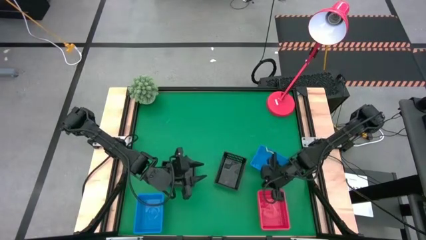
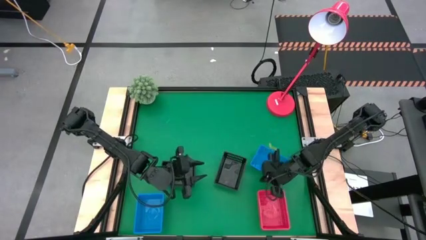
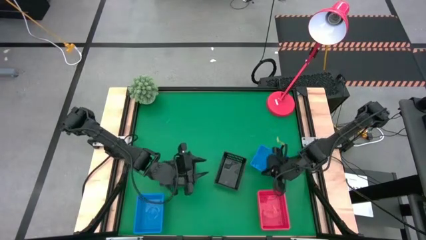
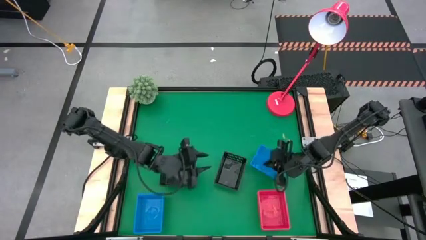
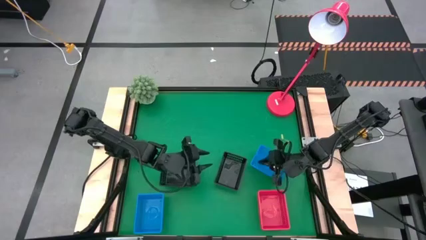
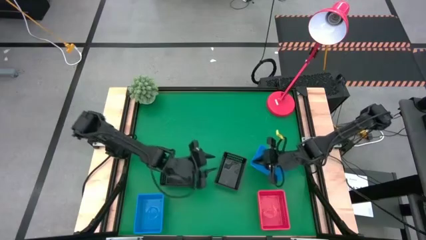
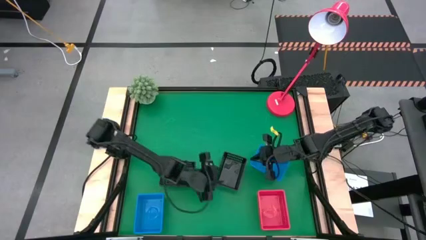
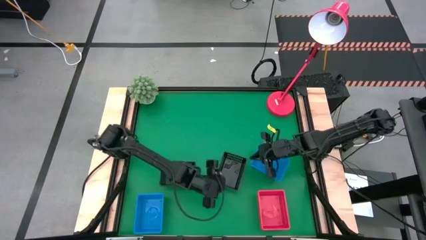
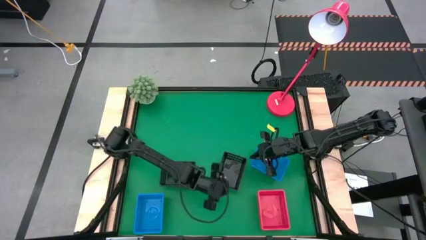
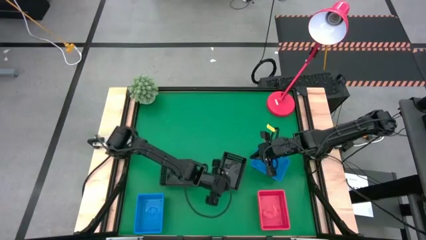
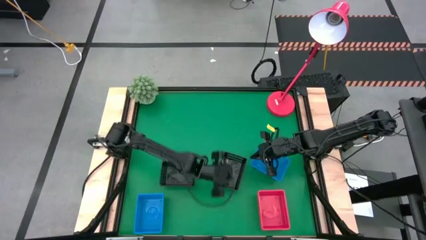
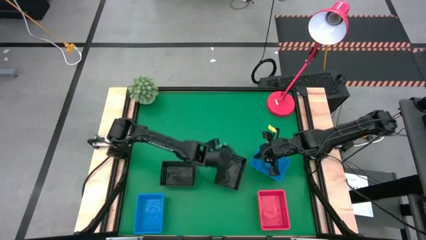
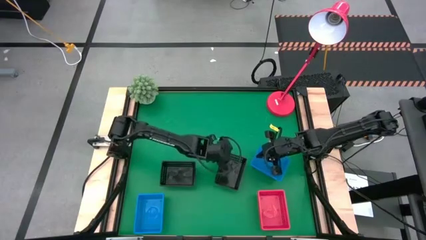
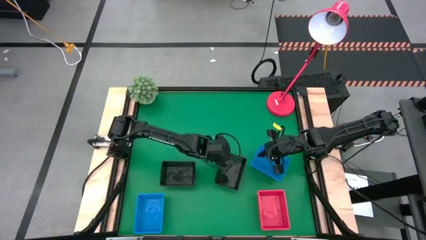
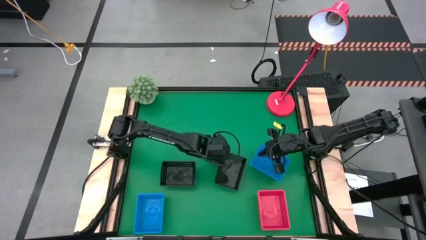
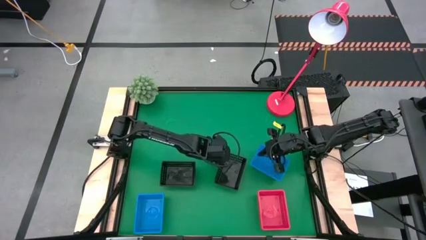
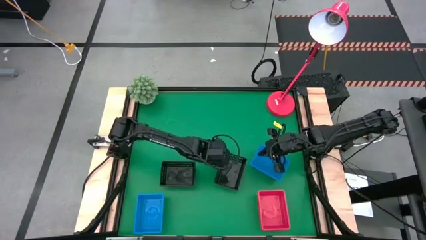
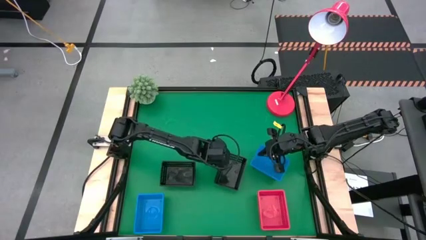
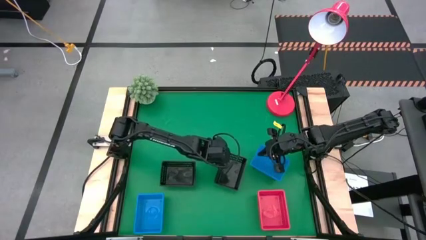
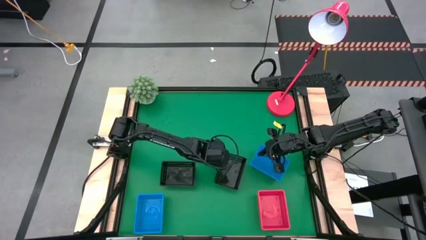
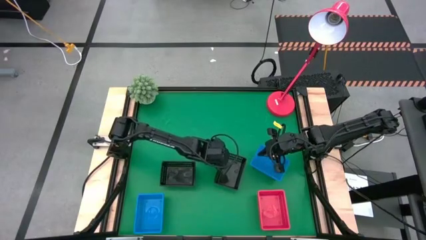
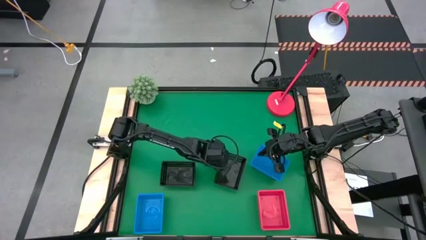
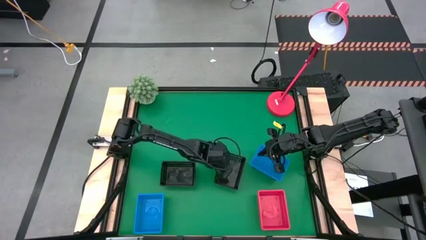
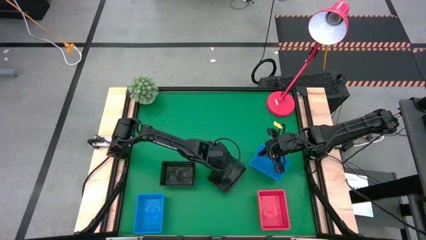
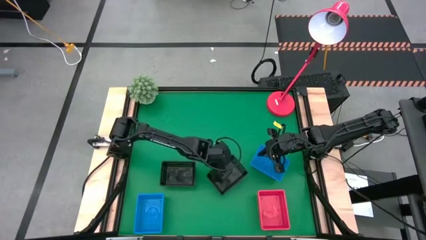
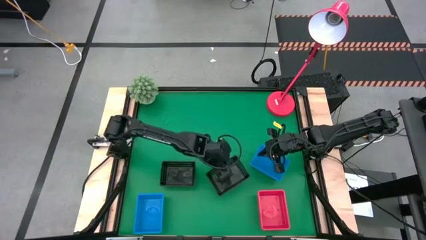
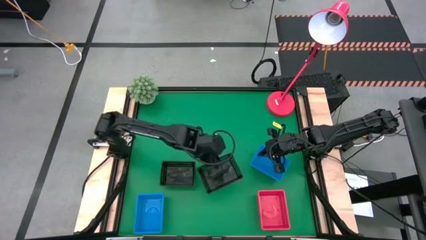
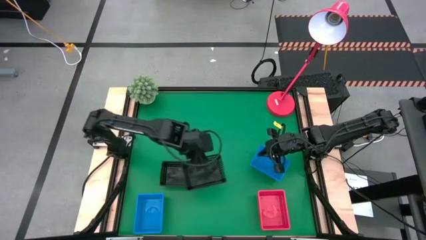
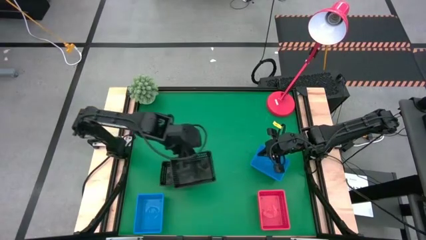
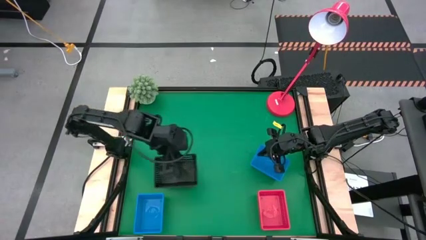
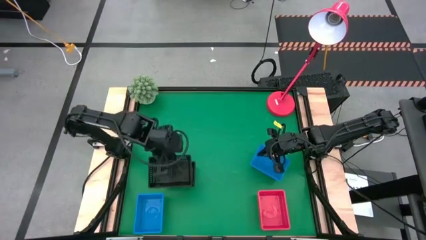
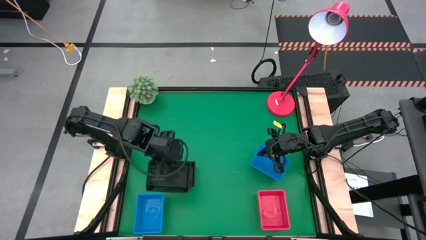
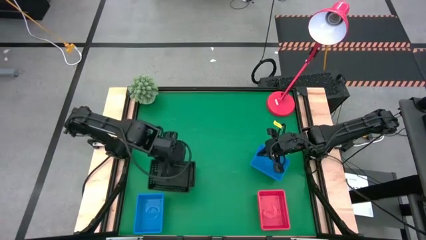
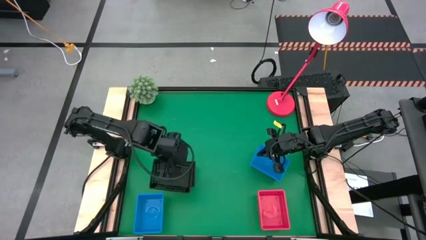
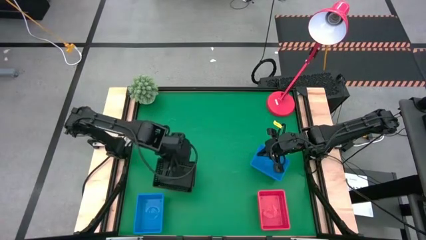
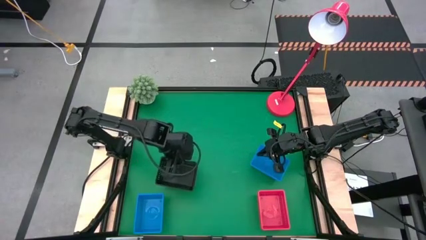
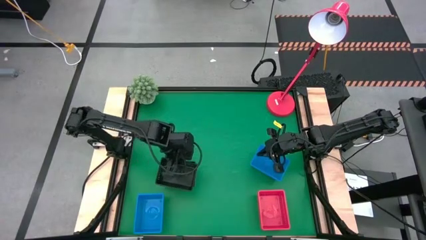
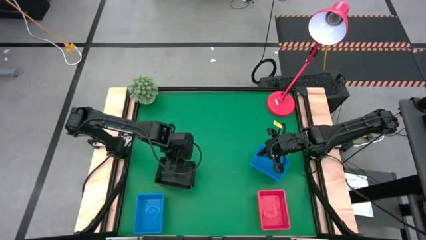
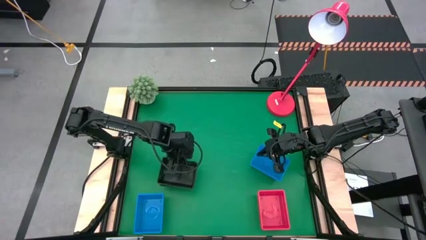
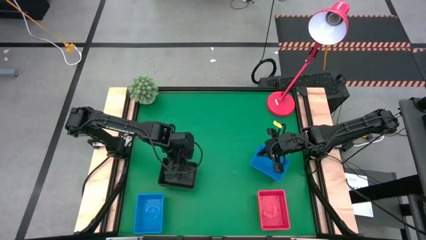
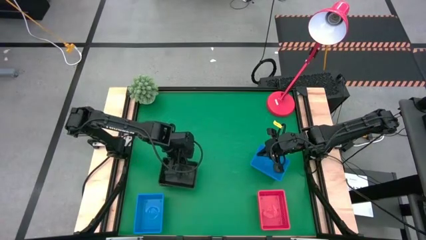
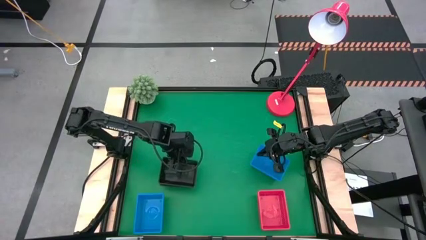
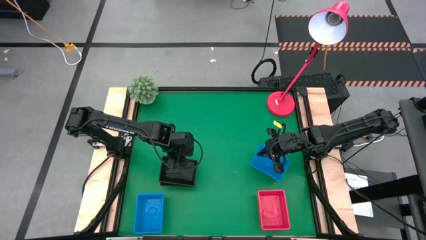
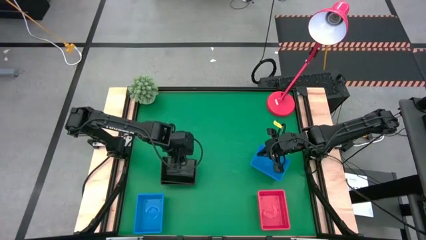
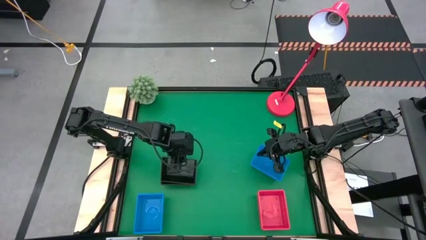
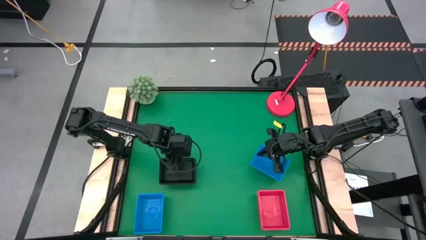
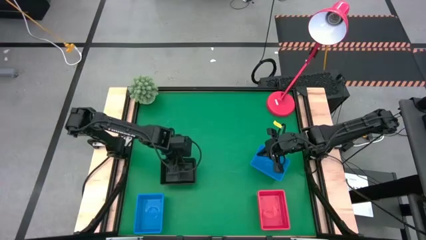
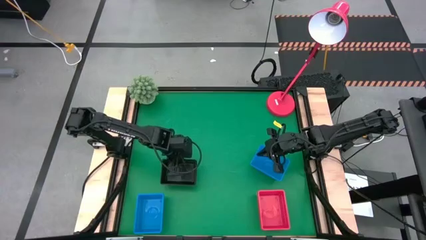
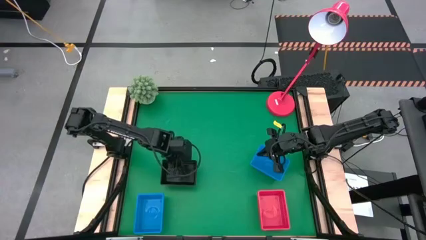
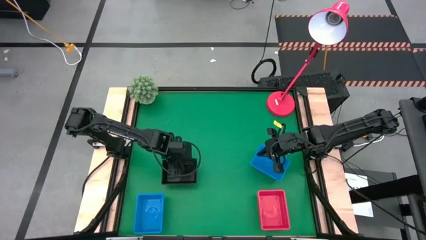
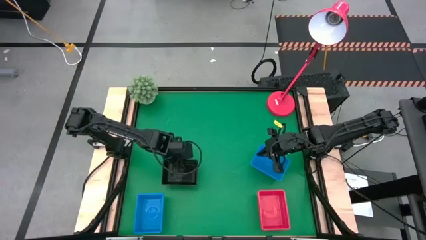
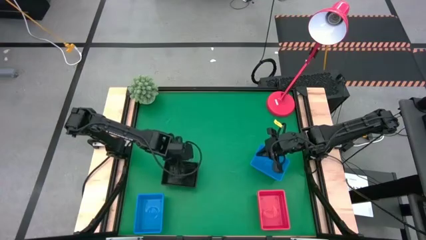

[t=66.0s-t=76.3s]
Stack the right black bin on the left stacked black bins

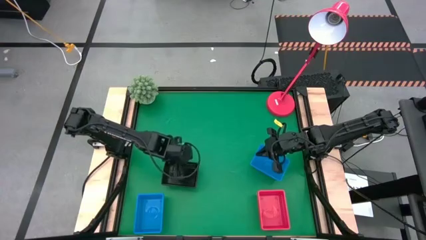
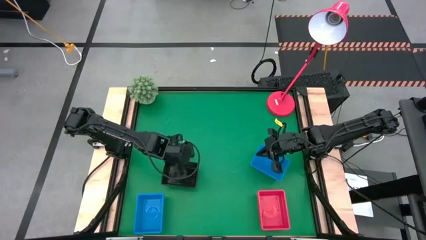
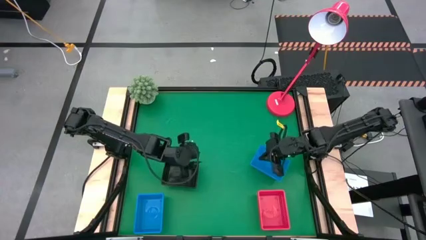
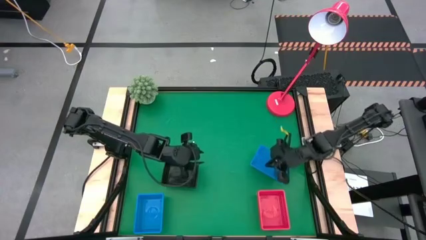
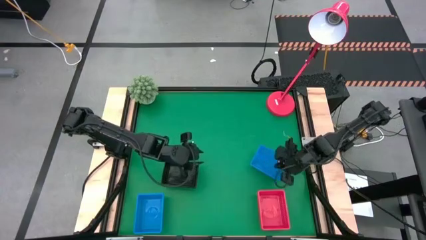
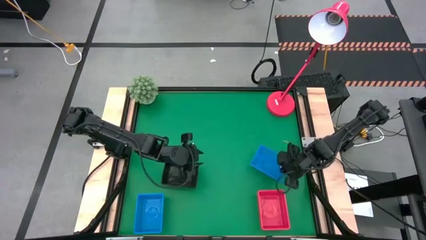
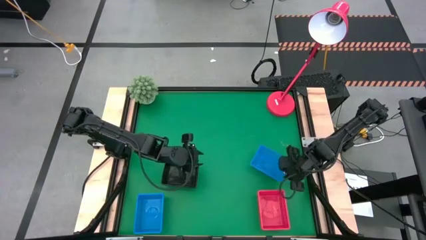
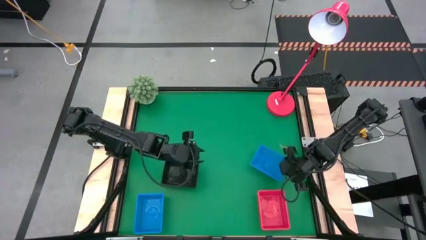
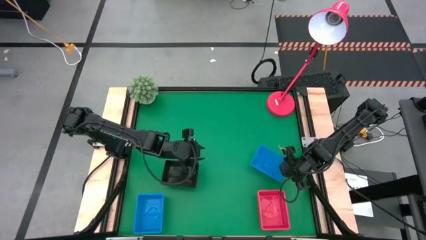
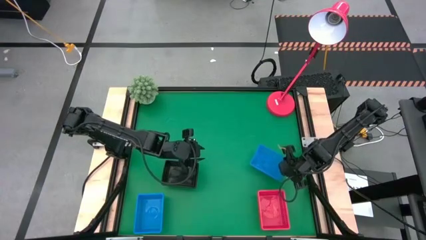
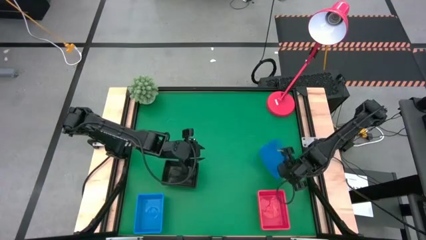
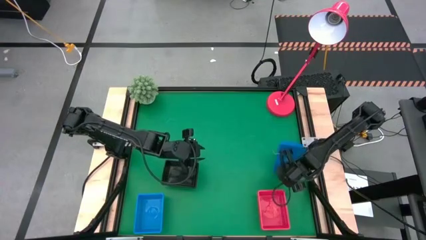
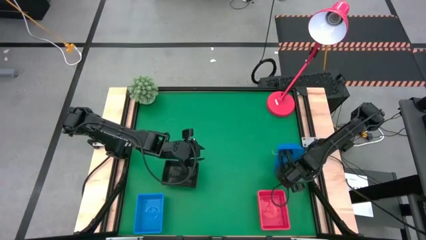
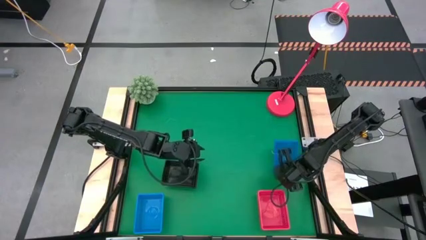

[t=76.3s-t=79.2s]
Stack the right blue bin on the left stacked blue bins
